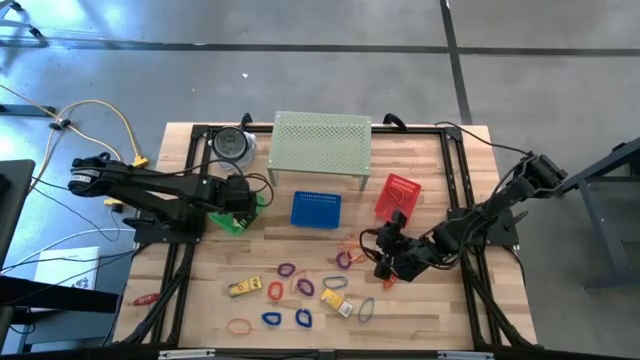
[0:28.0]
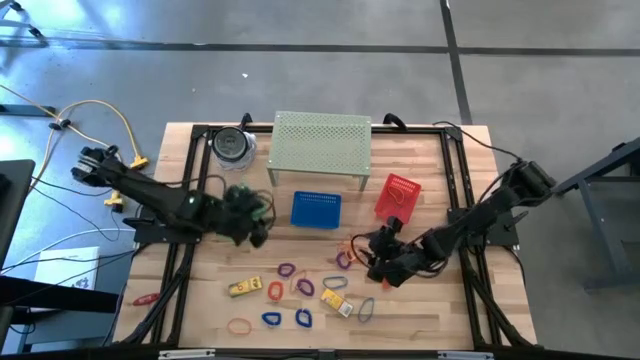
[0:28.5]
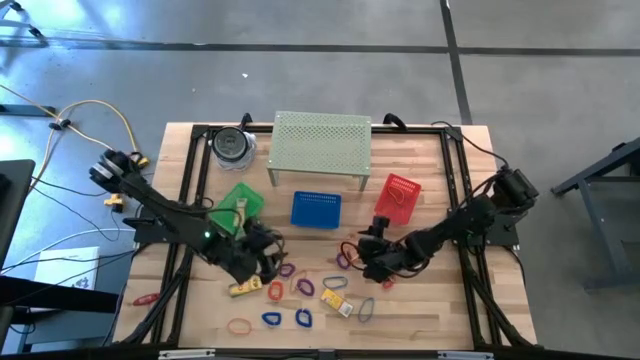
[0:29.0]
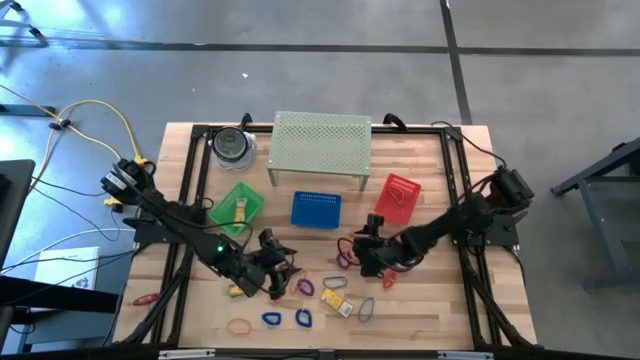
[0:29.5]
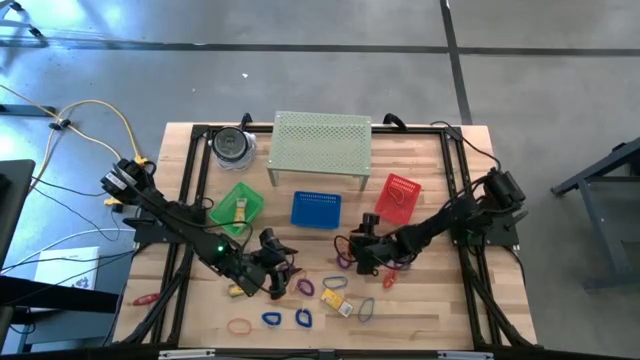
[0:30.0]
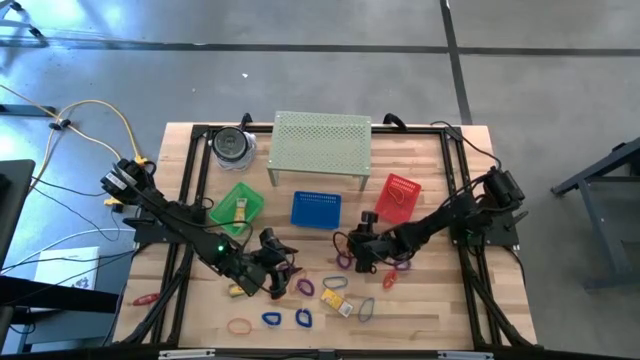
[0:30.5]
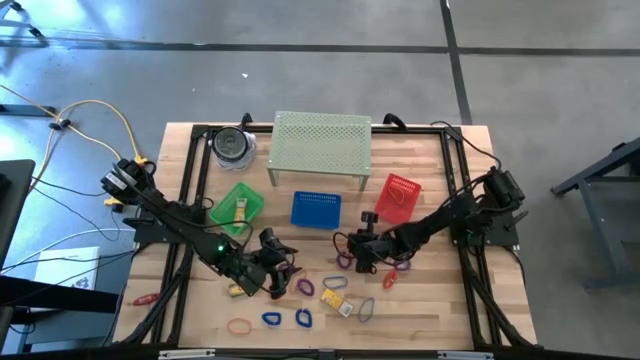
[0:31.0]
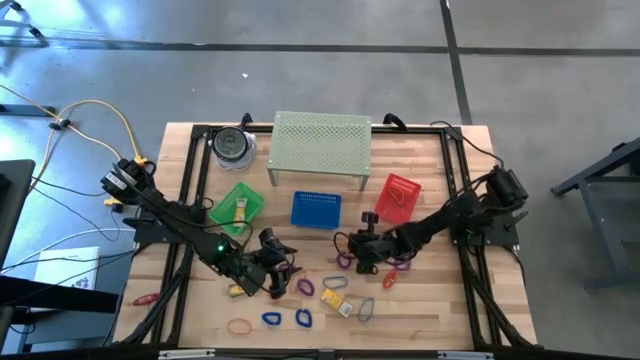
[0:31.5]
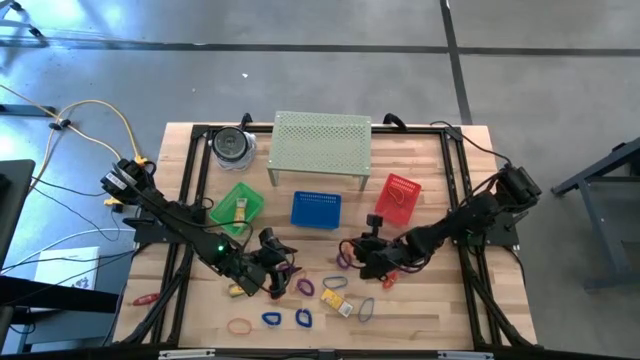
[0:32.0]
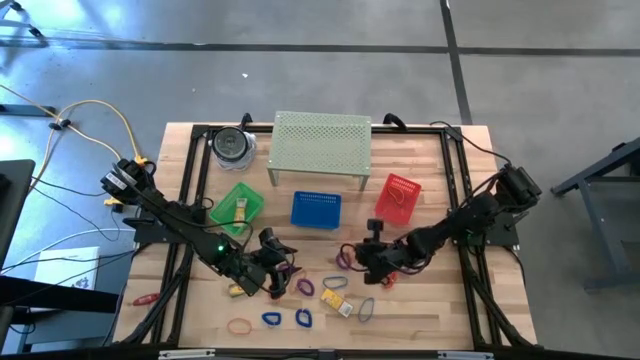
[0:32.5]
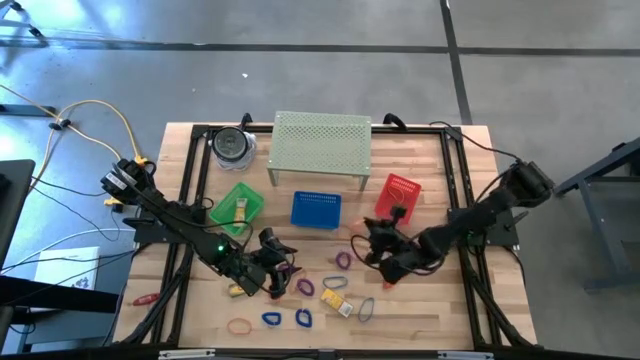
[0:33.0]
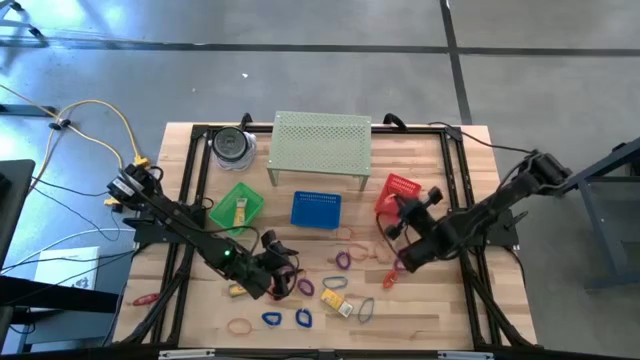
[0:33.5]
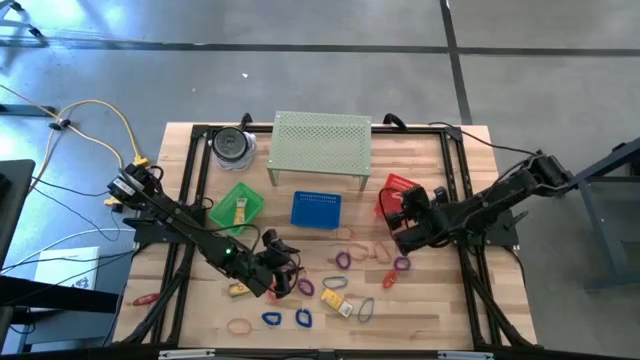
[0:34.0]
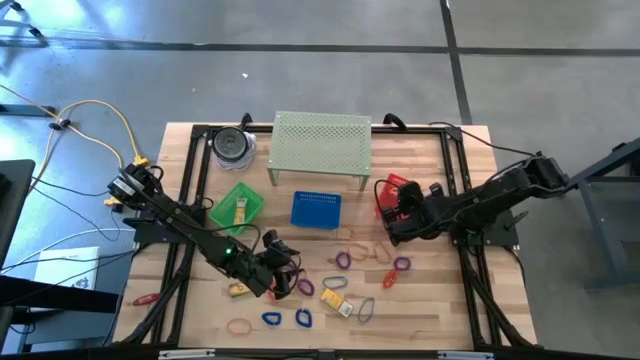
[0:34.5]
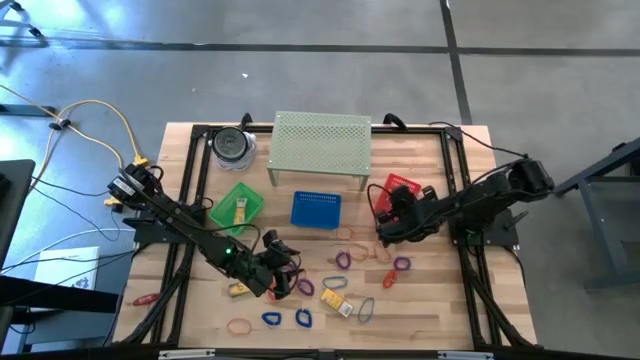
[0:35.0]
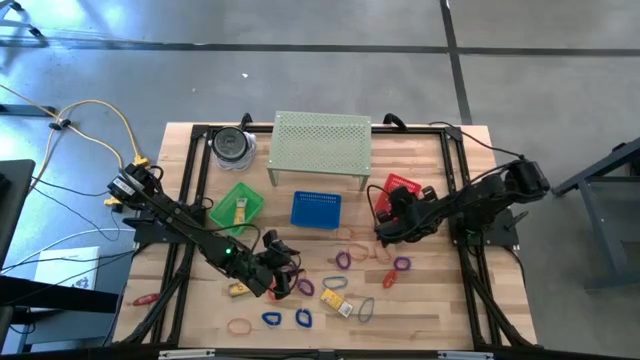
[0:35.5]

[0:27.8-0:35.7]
Task: Pick & Place Office Desk Supplies
Put the orange rubber band into the red bin

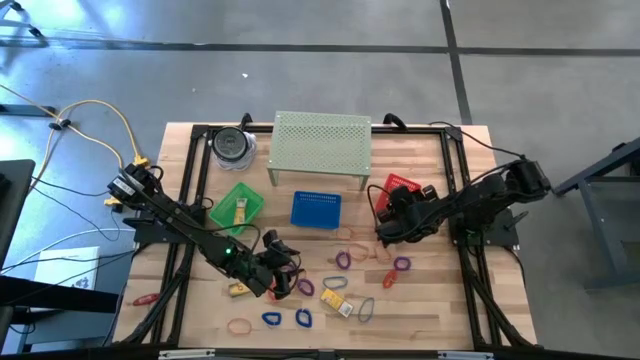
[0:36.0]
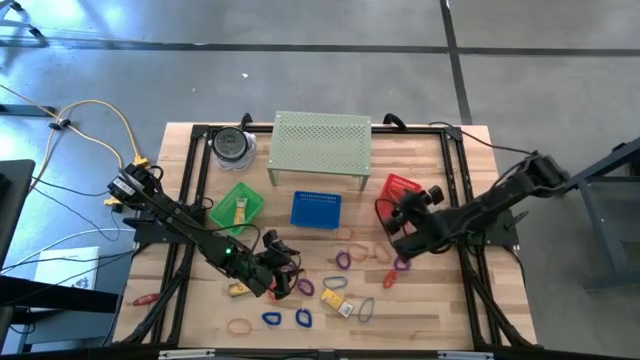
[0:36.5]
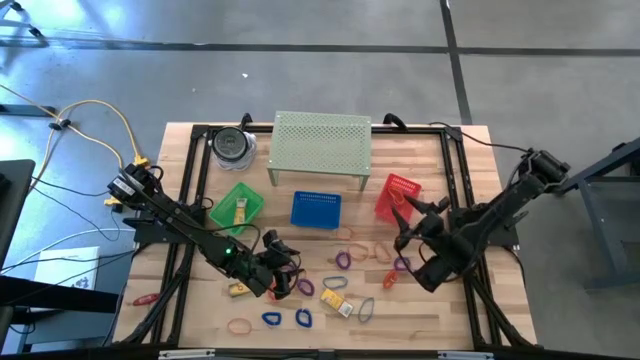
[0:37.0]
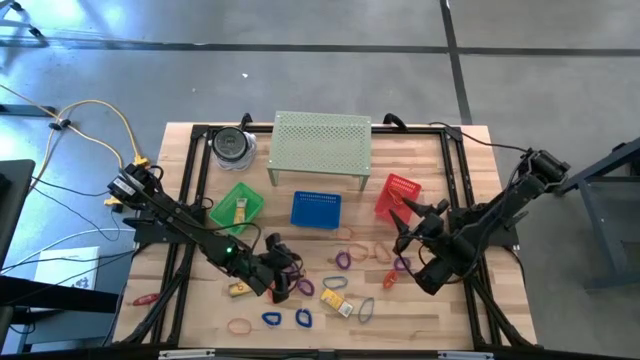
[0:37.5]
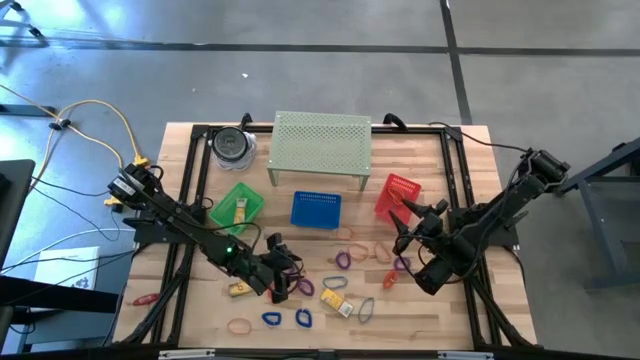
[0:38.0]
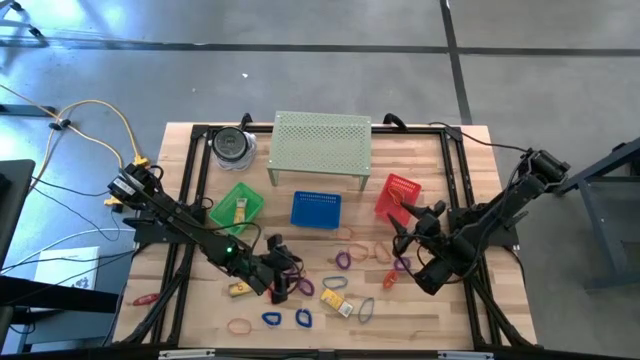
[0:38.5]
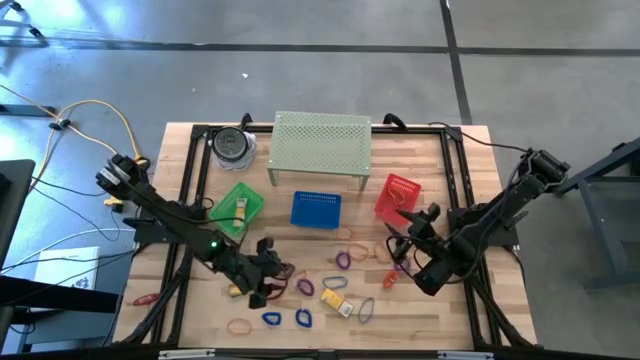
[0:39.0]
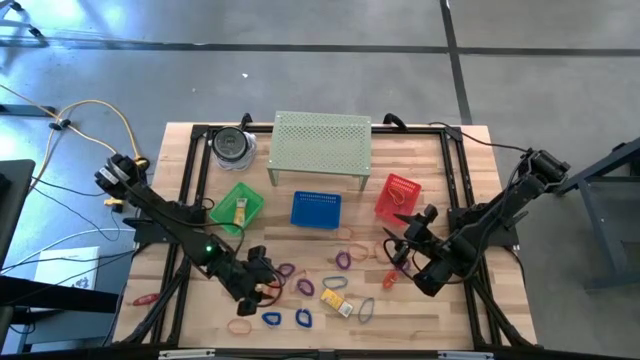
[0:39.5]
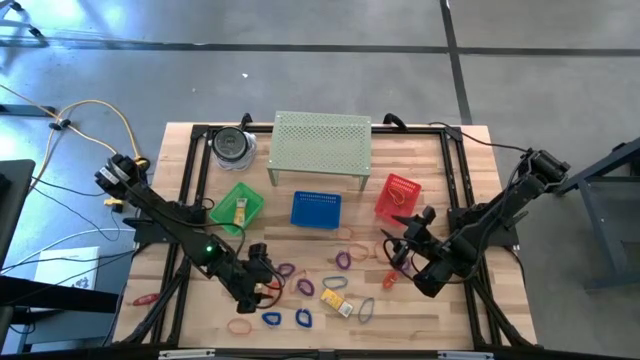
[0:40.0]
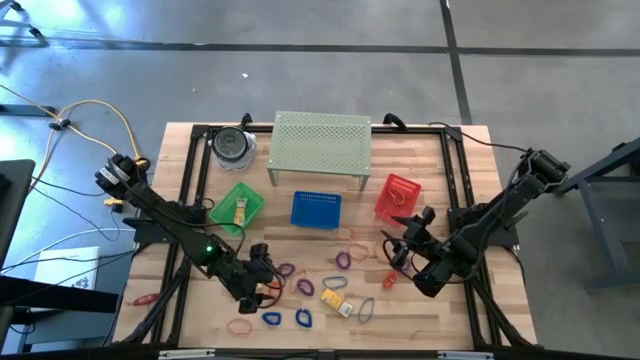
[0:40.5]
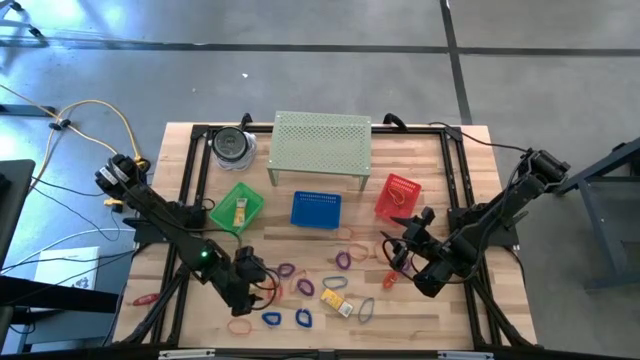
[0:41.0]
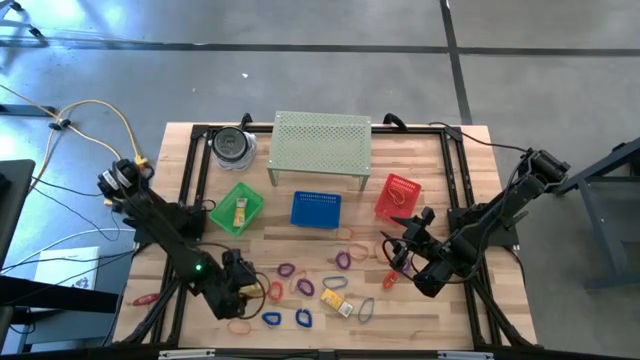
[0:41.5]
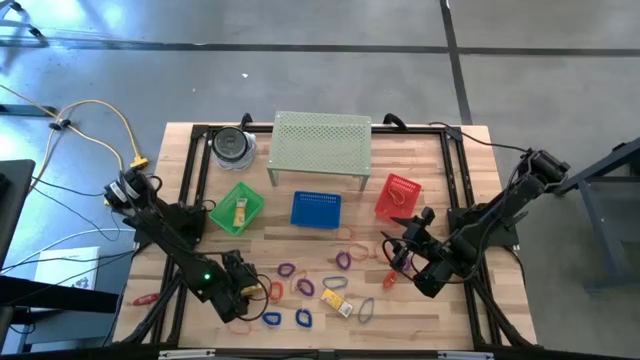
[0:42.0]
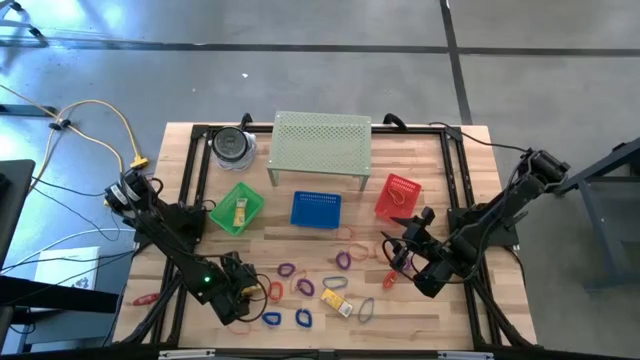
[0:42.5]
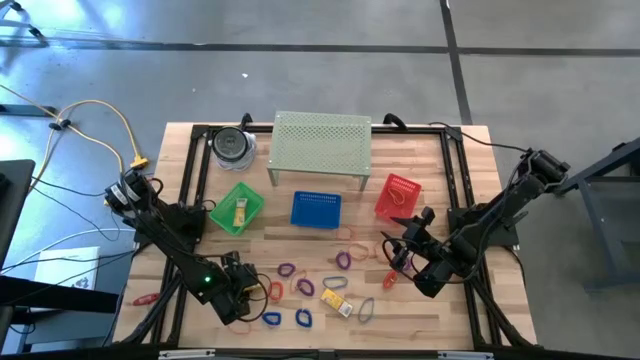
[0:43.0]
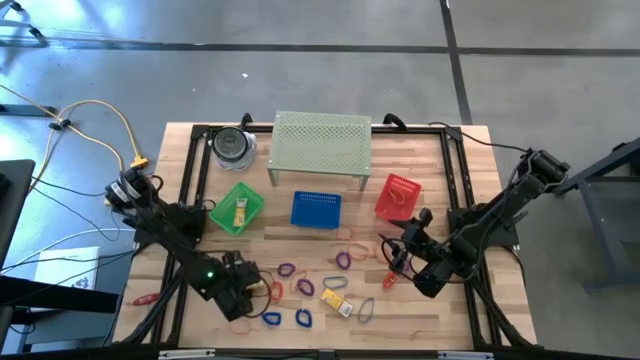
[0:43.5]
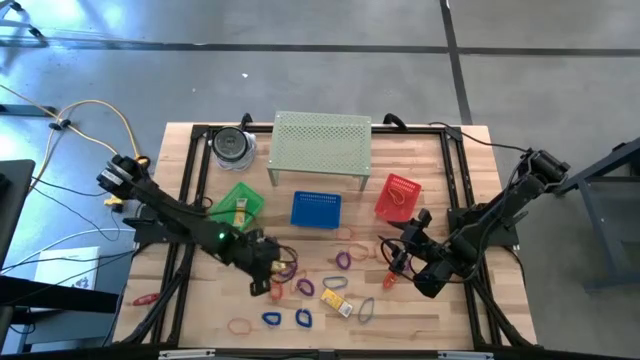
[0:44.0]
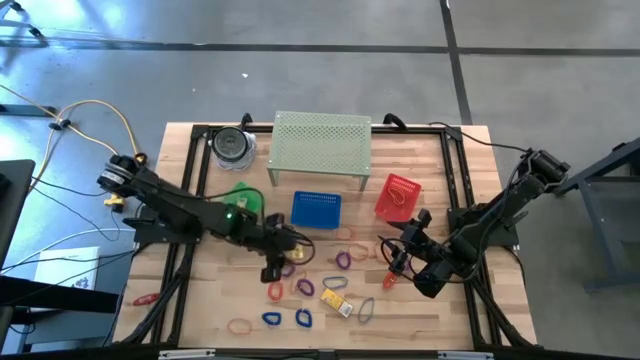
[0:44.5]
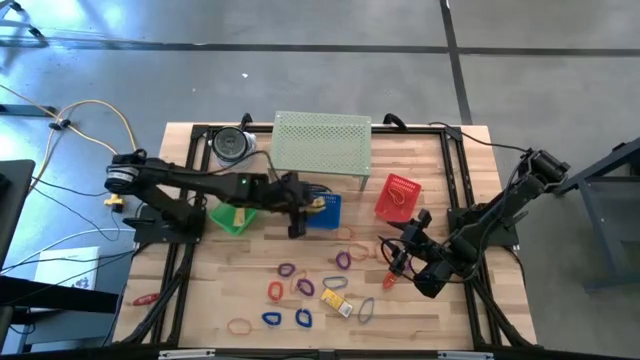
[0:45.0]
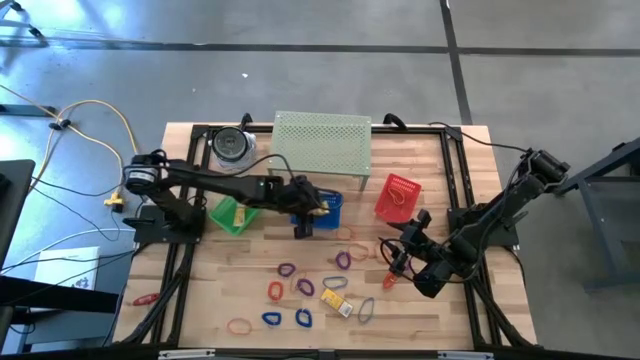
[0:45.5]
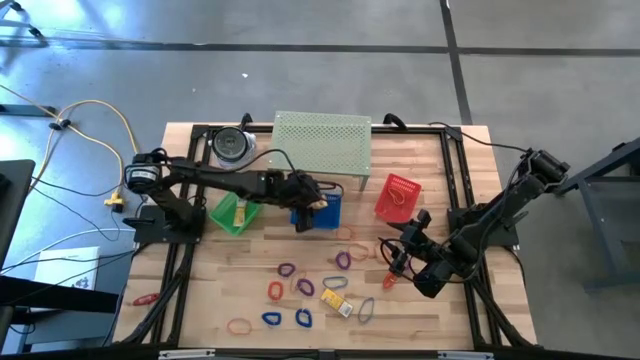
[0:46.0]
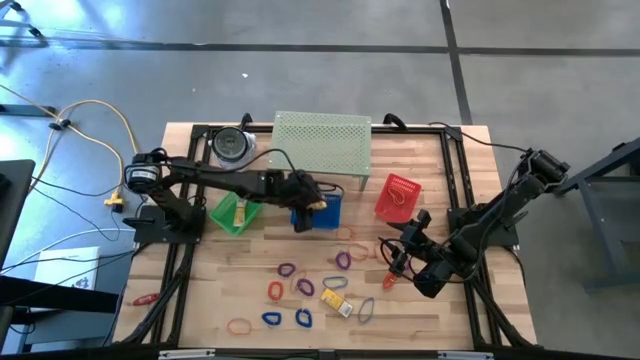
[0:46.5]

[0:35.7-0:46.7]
Put the crayon box into the blue bin

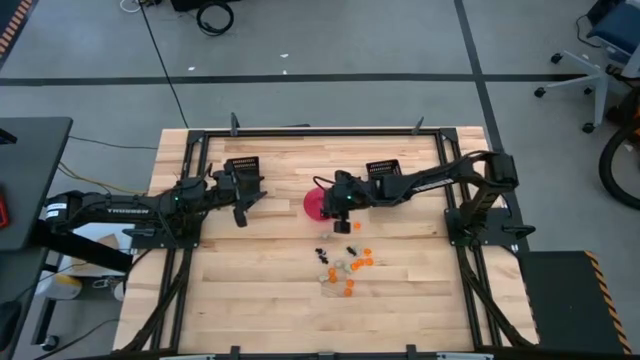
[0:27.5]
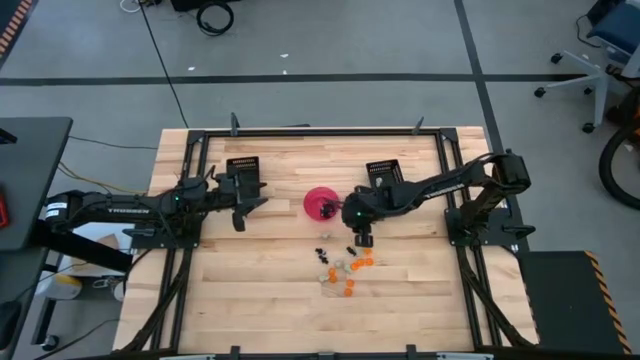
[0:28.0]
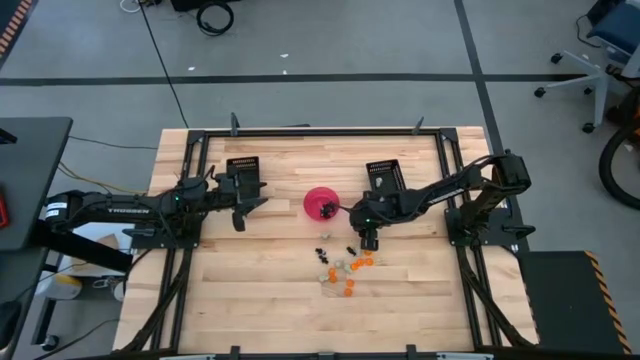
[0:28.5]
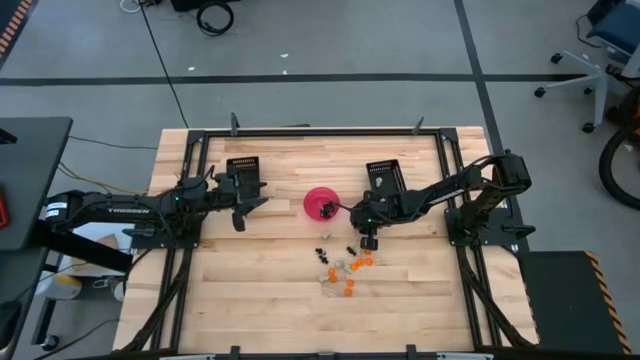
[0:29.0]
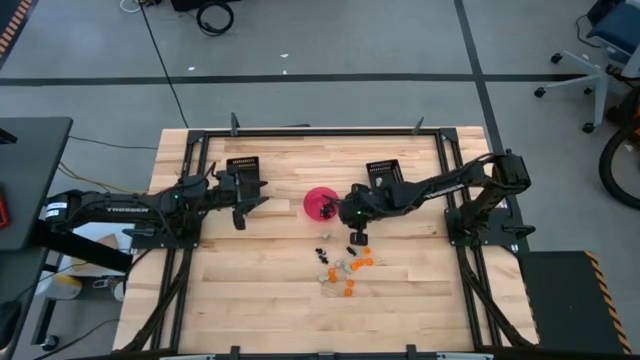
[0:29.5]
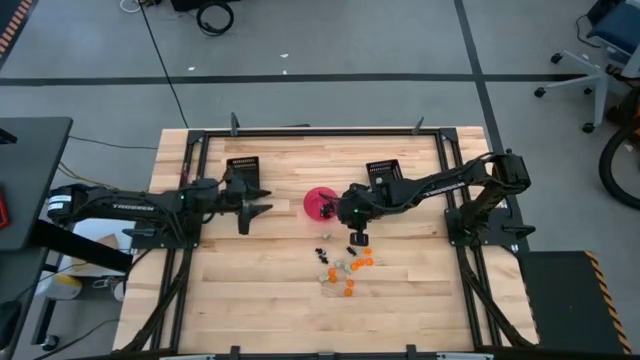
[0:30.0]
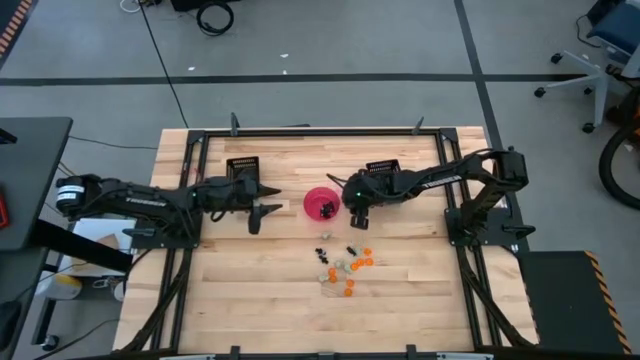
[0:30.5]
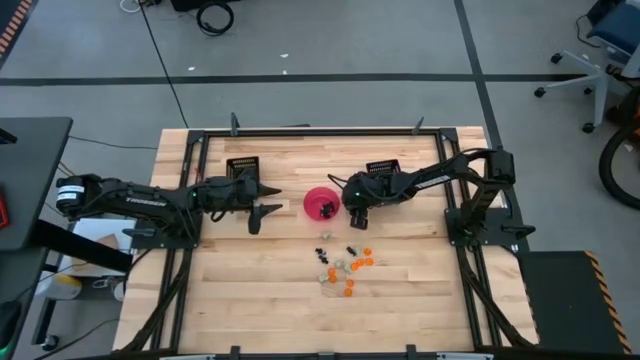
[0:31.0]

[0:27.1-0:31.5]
Task: Sort Halloween decoration
Put the orange pumpkin toy into the the left black bin
